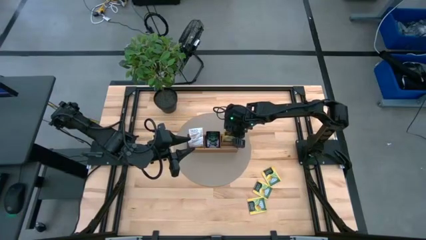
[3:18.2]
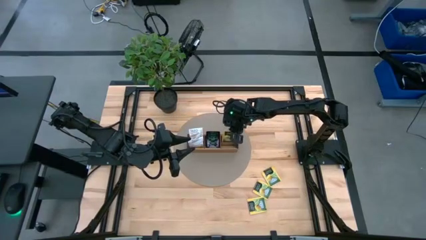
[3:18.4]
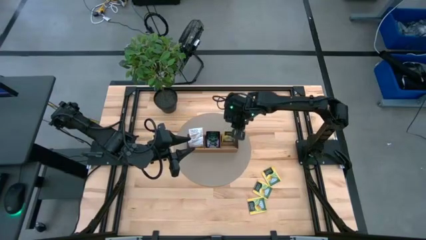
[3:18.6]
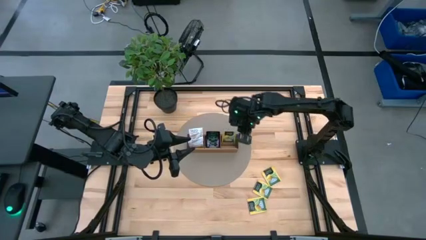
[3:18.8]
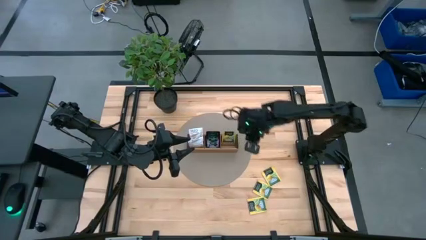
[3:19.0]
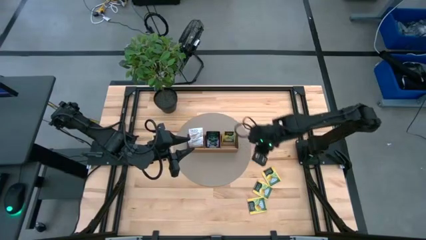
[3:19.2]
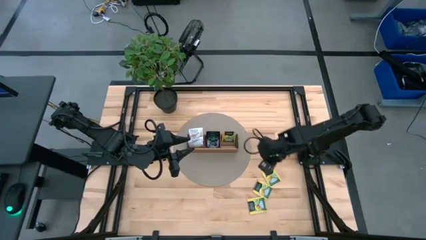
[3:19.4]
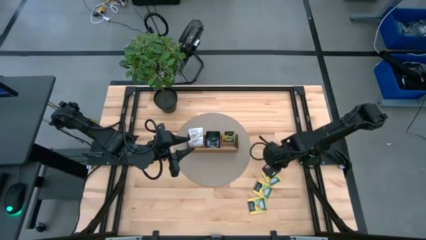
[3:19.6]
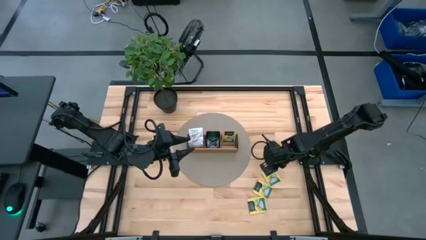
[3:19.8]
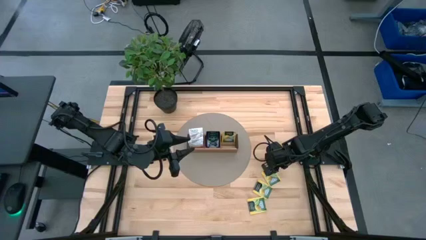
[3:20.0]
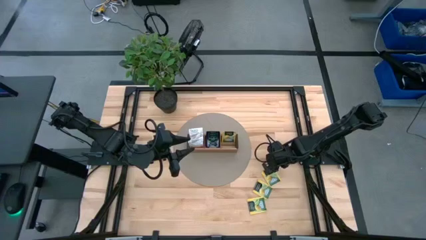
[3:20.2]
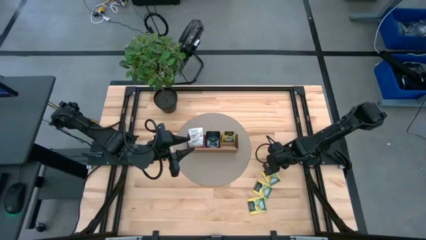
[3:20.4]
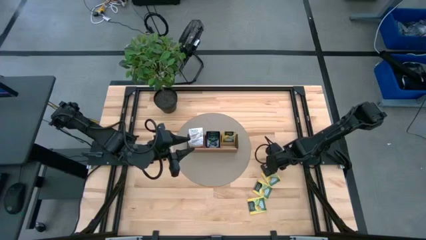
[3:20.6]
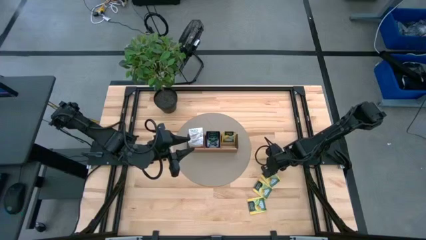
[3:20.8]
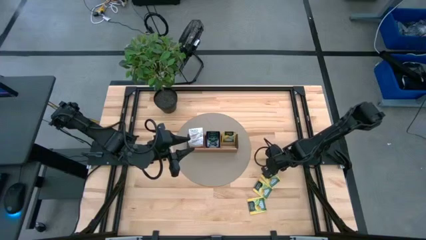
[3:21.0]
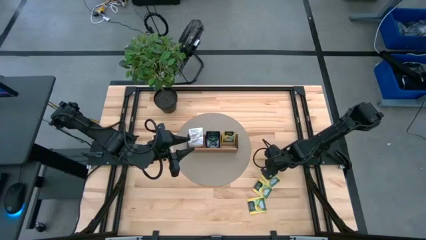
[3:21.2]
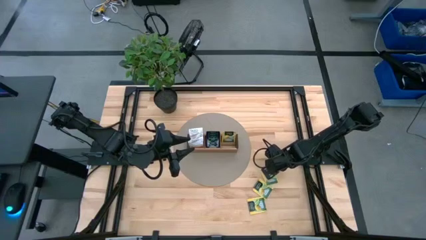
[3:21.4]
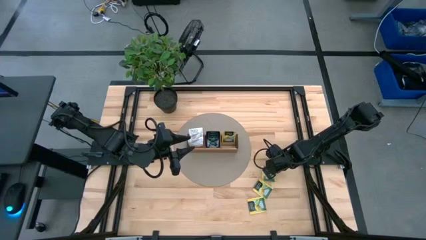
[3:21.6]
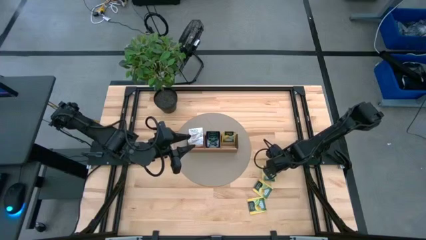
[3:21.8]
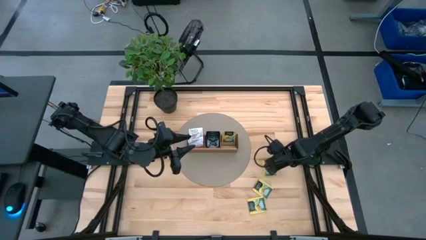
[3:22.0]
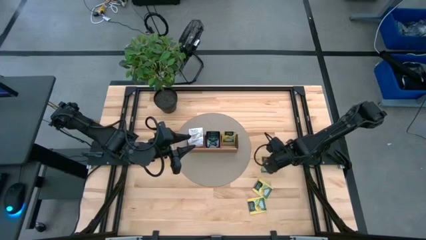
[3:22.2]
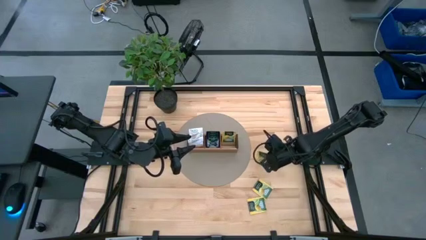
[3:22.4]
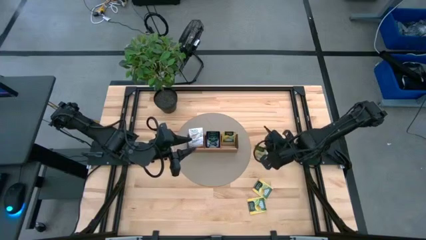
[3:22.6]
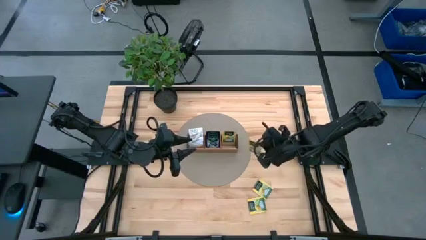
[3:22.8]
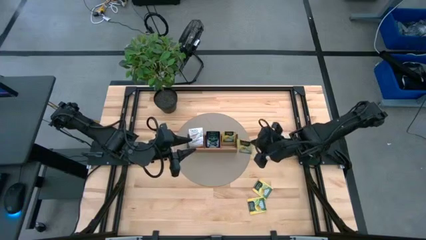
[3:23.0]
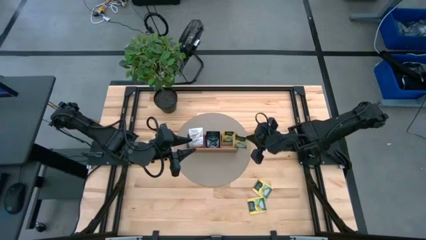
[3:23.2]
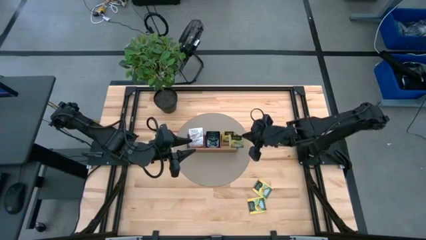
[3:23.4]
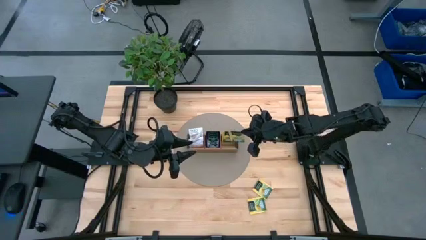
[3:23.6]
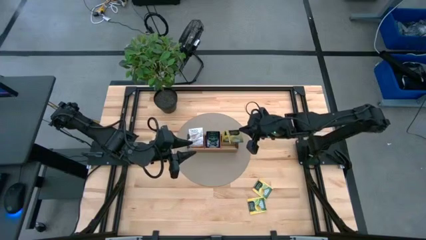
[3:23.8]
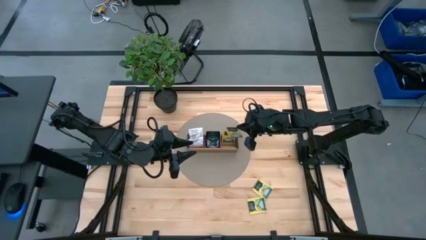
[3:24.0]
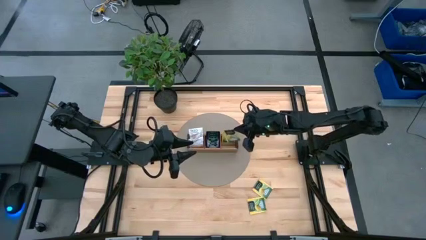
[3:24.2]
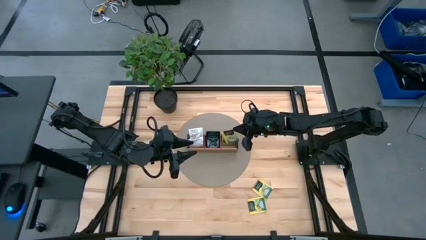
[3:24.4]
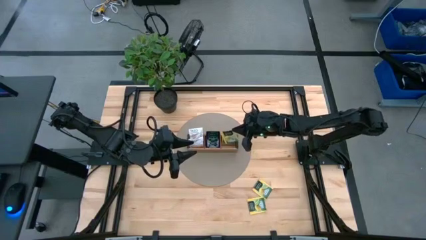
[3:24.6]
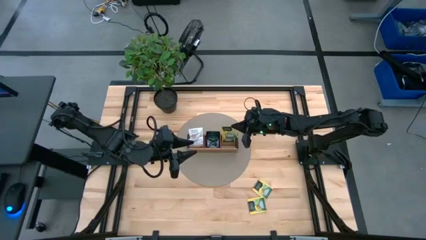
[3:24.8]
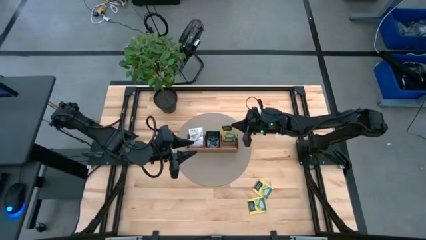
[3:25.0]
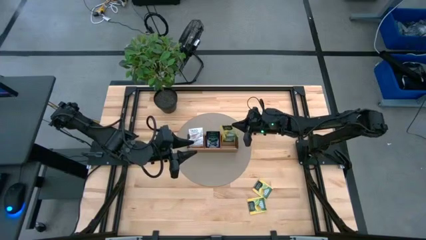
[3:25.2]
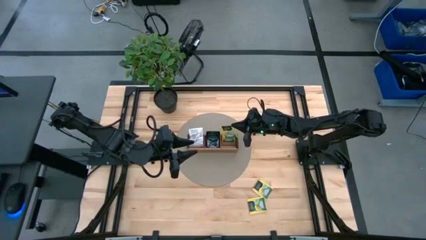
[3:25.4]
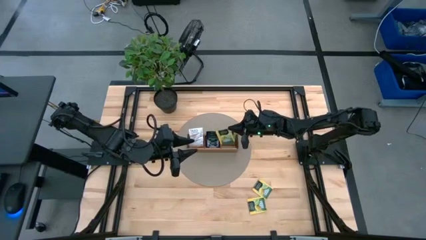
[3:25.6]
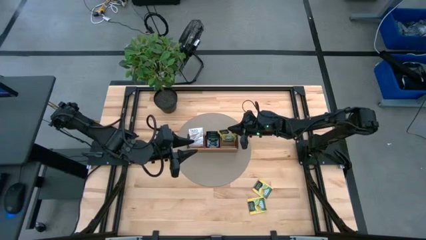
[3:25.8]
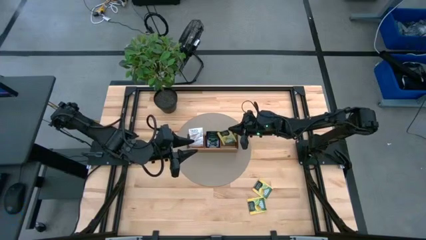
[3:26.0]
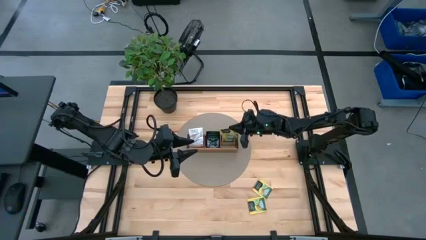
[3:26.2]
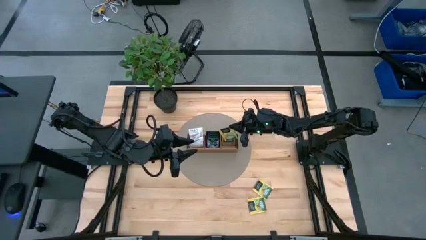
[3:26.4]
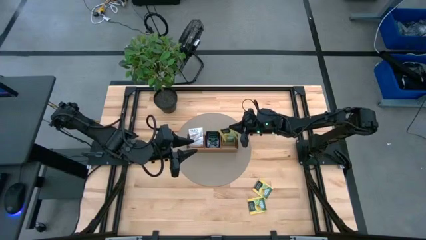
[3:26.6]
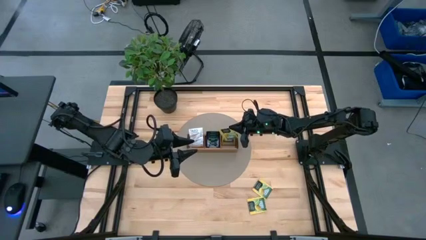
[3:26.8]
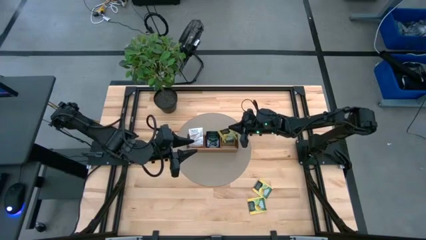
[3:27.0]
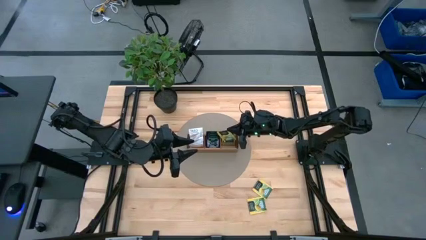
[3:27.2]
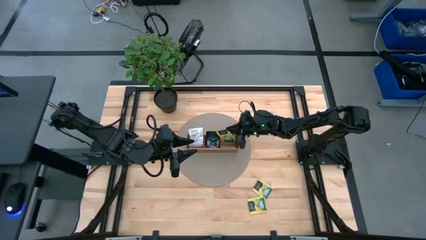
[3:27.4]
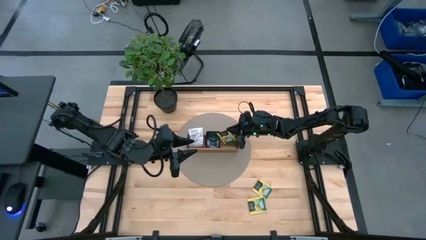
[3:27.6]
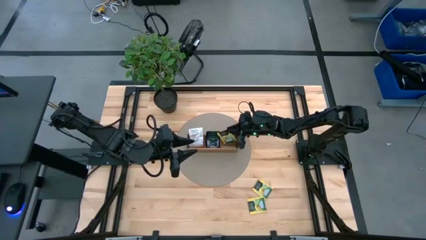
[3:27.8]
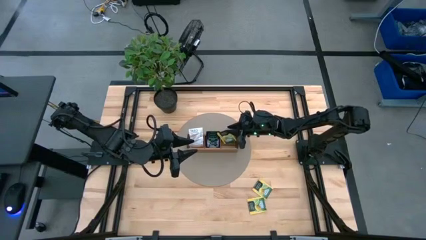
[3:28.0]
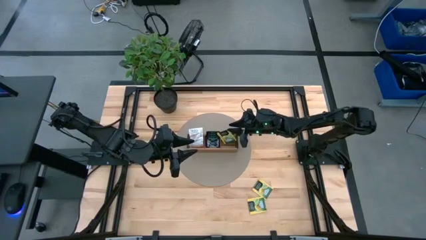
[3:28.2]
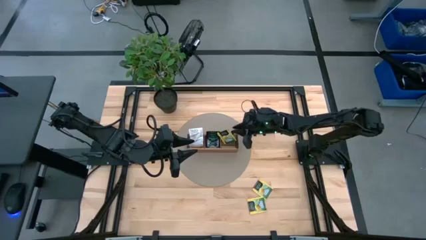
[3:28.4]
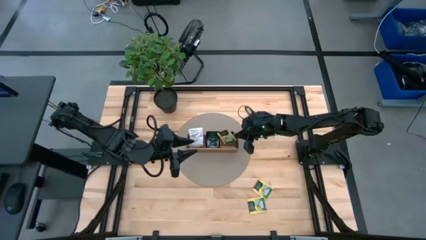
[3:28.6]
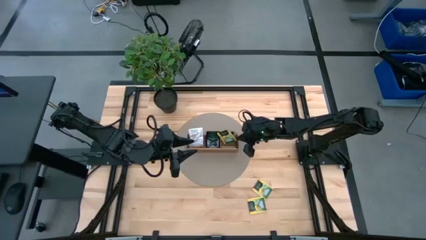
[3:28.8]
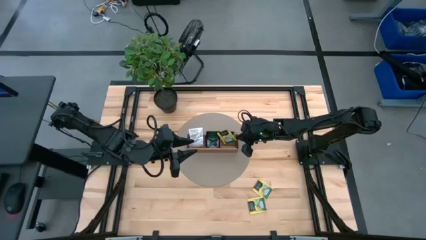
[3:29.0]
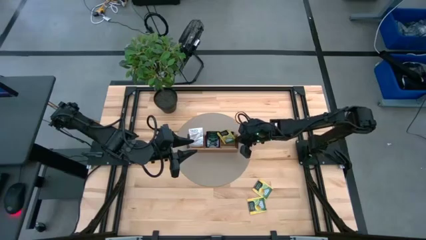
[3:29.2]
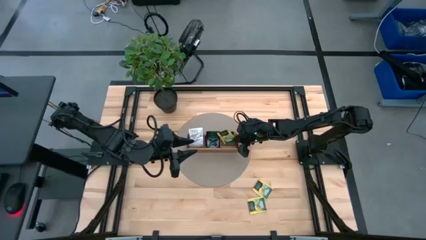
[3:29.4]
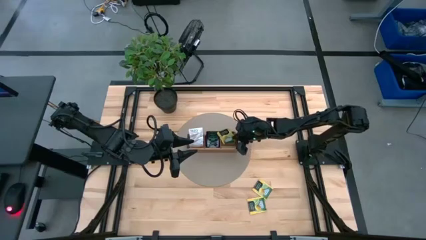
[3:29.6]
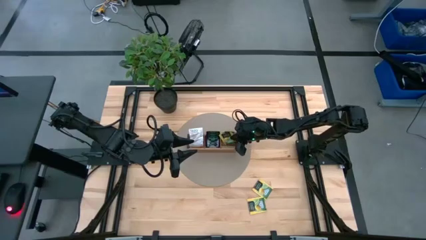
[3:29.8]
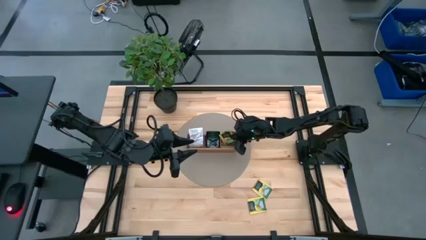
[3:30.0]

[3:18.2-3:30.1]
Task: Pick & Place Tea
Put the yellow tea bag into the right section of the wooden organizer

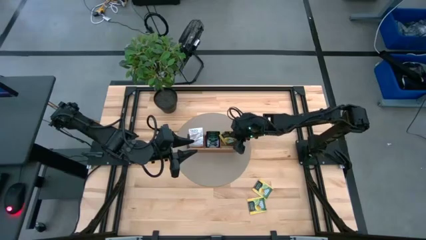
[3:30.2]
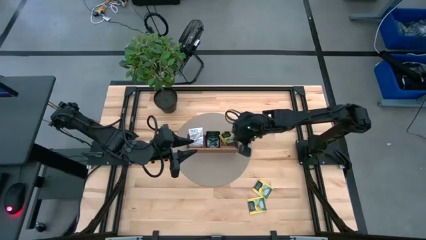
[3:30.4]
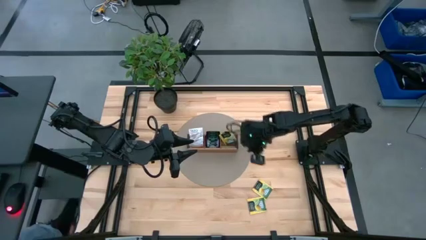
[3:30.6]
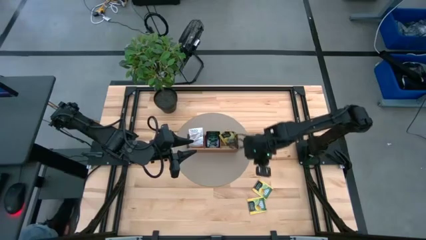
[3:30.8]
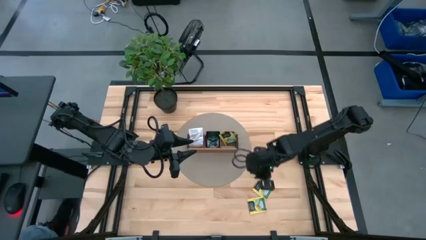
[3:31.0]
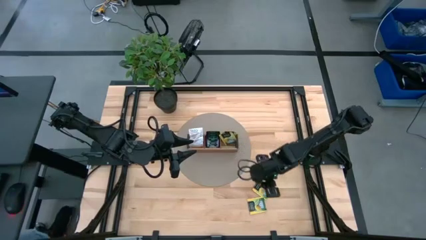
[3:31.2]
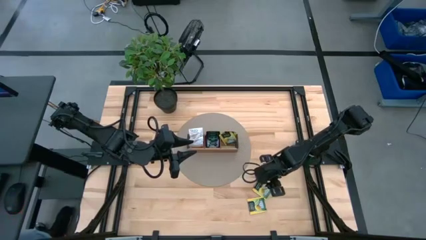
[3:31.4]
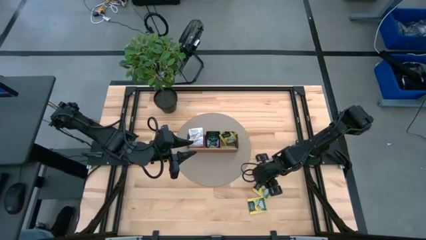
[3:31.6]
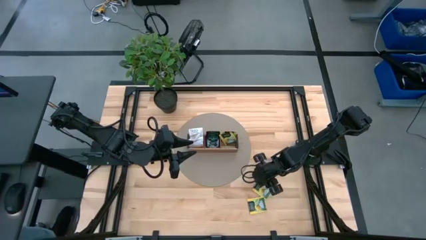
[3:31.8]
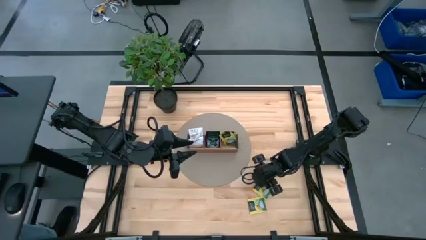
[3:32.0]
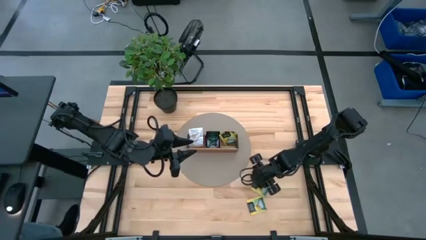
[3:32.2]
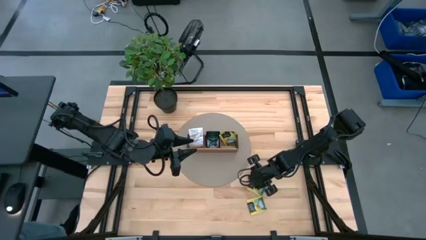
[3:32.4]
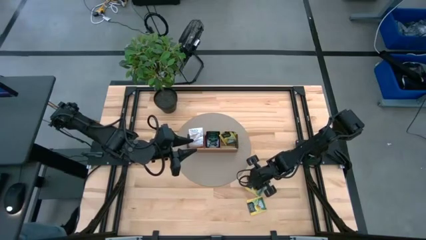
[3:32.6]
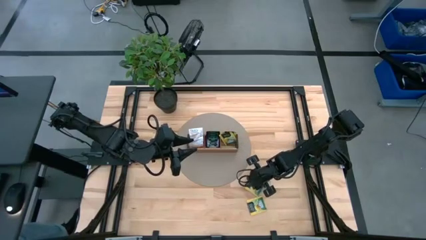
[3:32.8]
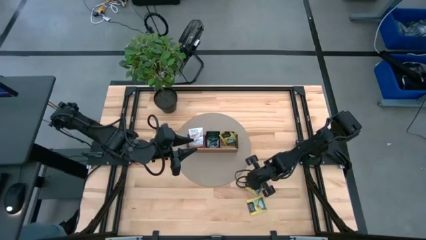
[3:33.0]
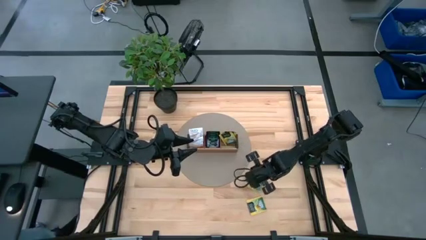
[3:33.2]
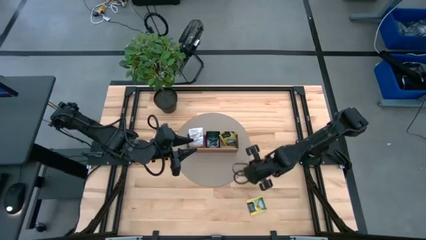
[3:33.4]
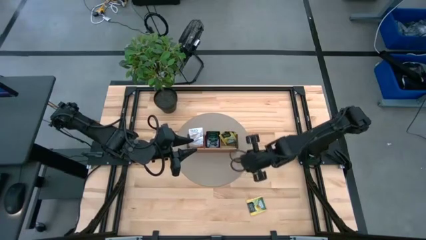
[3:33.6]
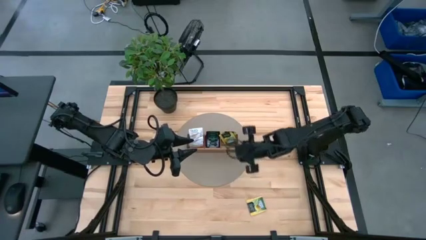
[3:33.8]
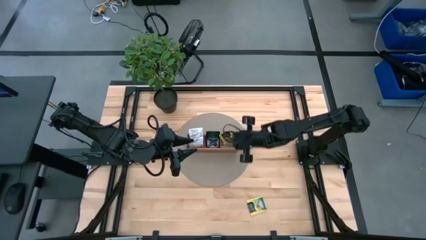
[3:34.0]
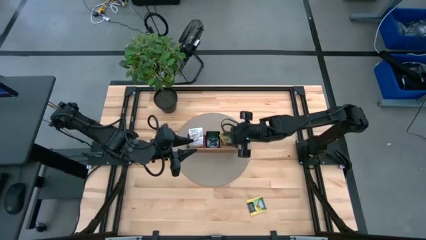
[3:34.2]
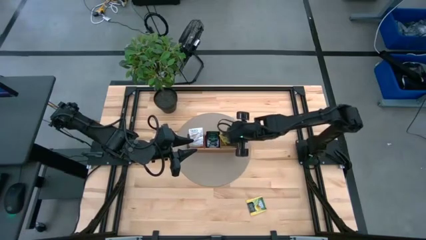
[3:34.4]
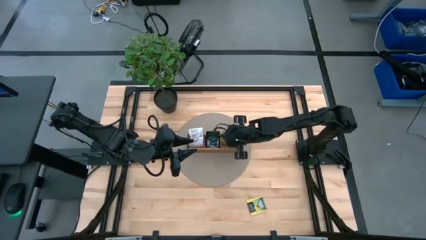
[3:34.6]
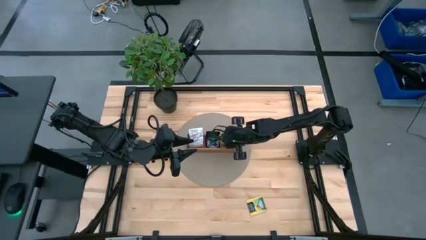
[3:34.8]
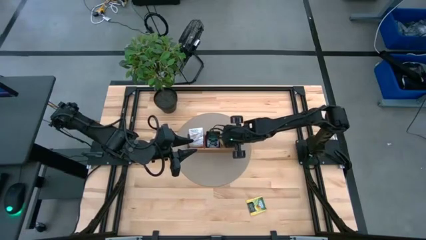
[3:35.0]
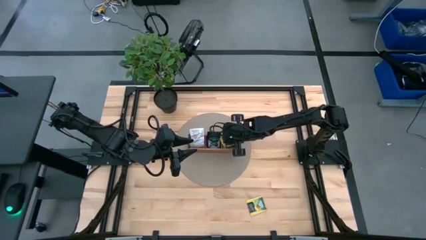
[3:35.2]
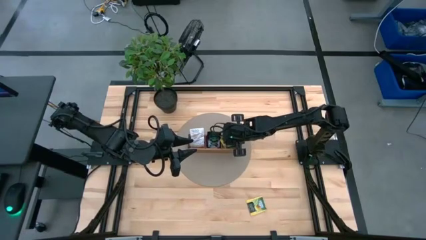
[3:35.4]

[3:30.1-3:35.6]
Put the yellow tea bag into the right section of the wooden organizer
